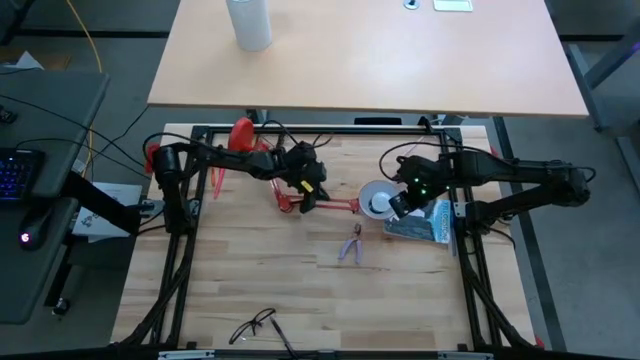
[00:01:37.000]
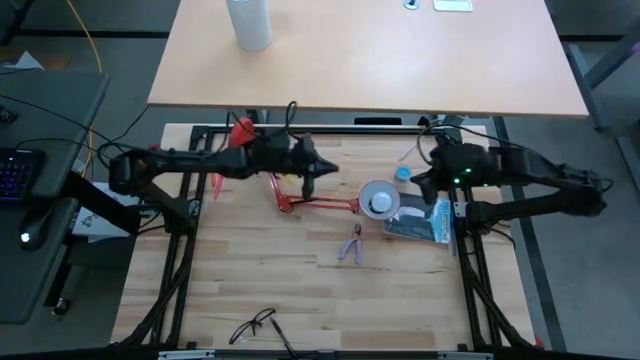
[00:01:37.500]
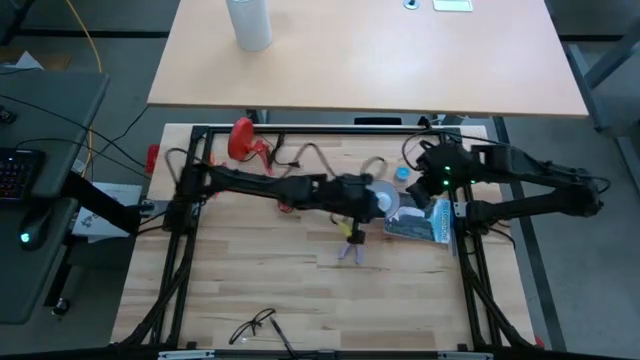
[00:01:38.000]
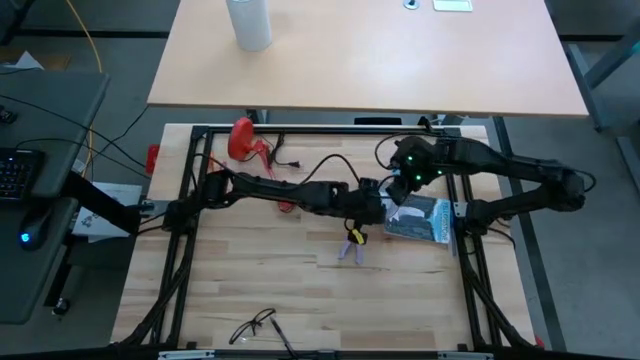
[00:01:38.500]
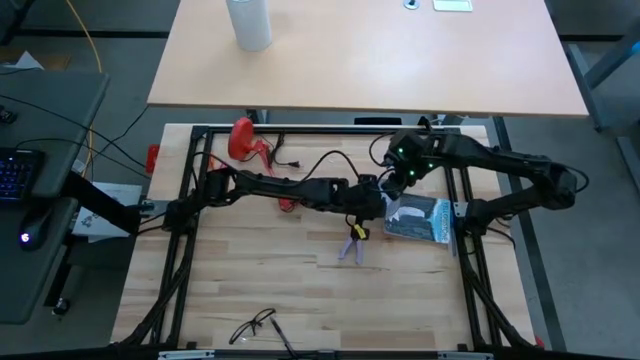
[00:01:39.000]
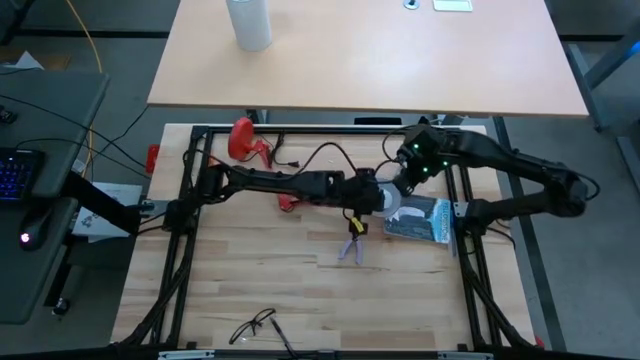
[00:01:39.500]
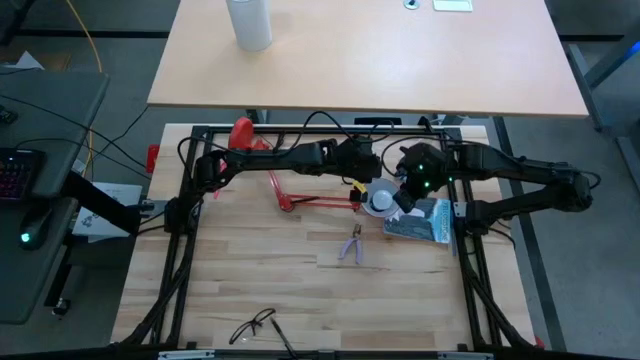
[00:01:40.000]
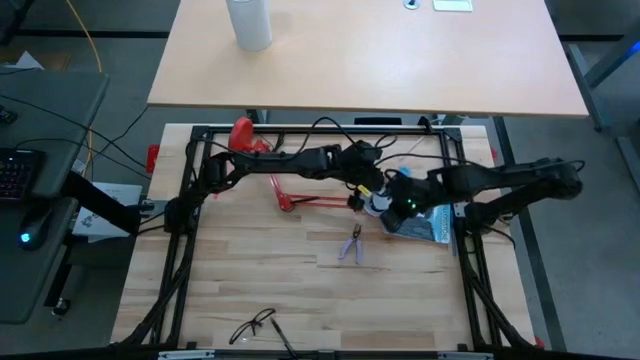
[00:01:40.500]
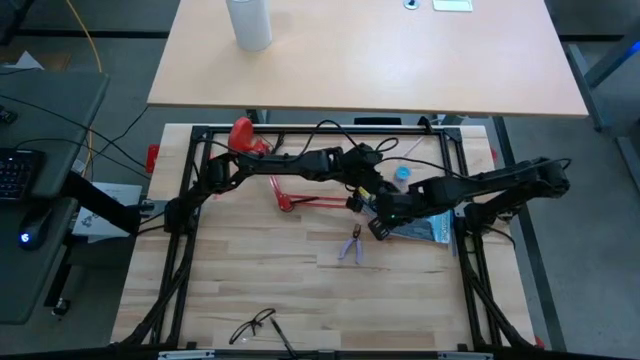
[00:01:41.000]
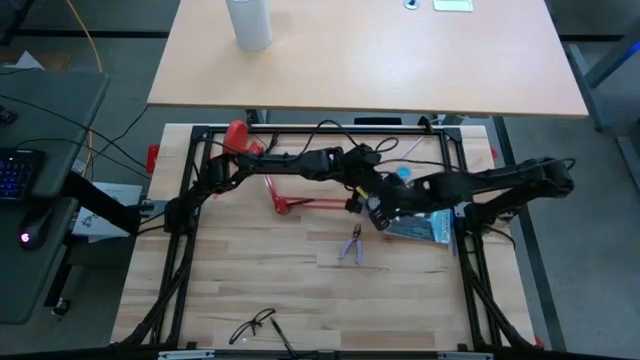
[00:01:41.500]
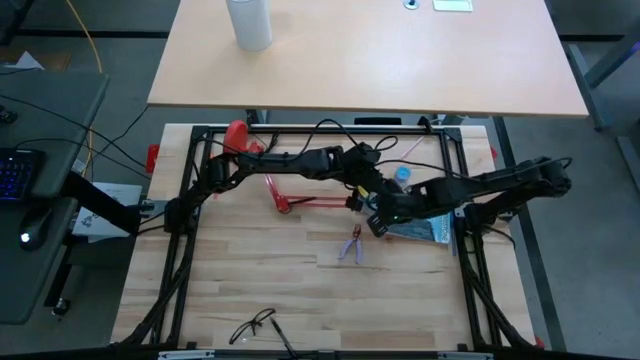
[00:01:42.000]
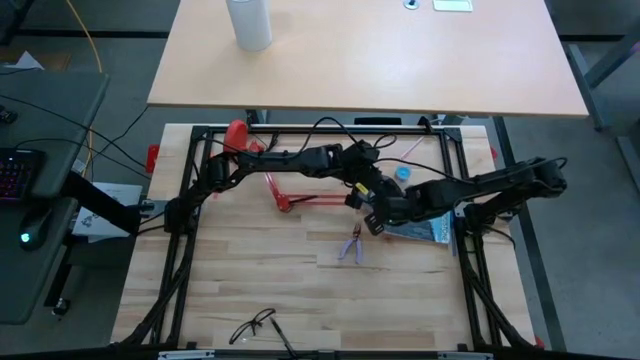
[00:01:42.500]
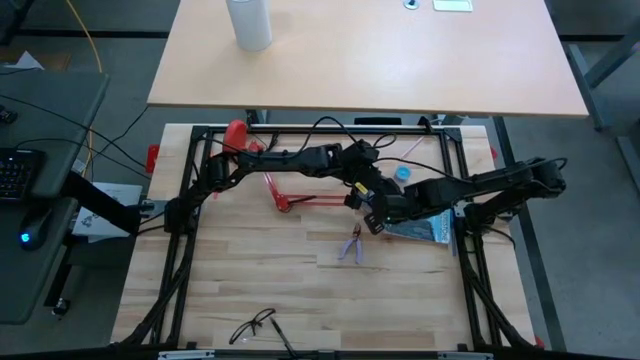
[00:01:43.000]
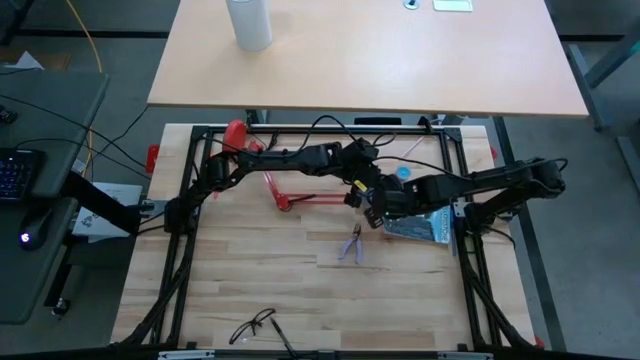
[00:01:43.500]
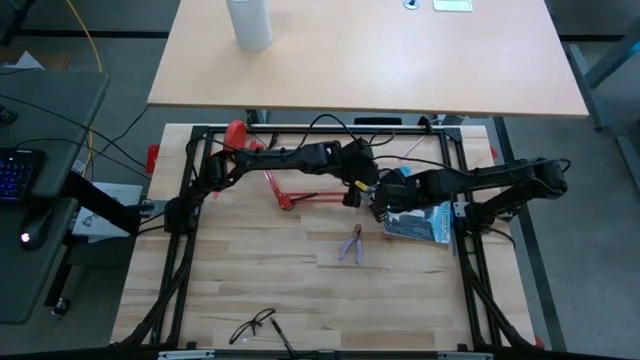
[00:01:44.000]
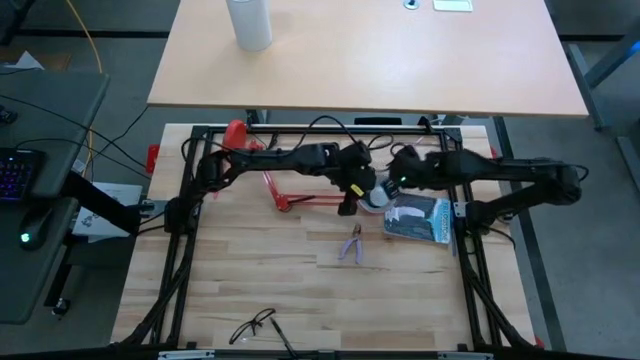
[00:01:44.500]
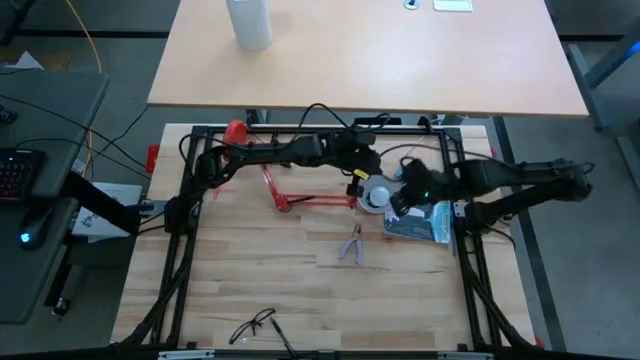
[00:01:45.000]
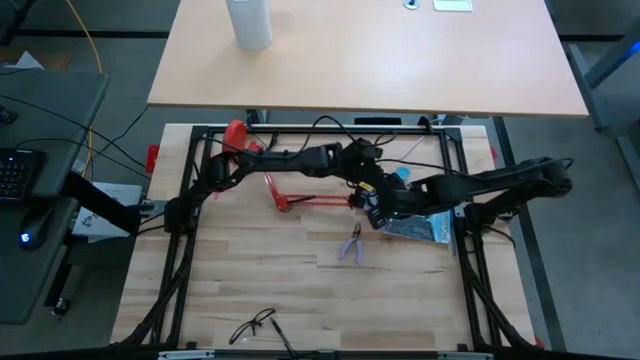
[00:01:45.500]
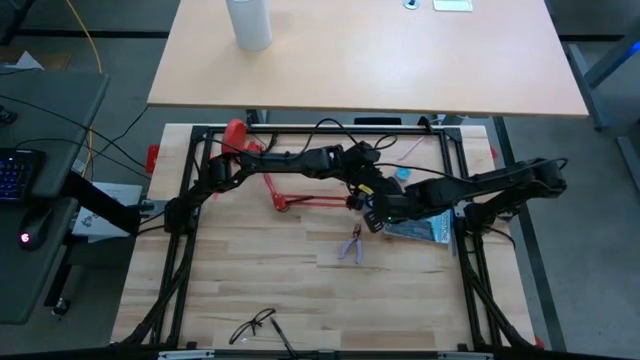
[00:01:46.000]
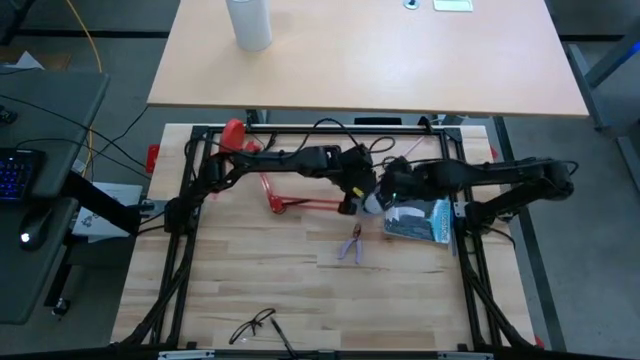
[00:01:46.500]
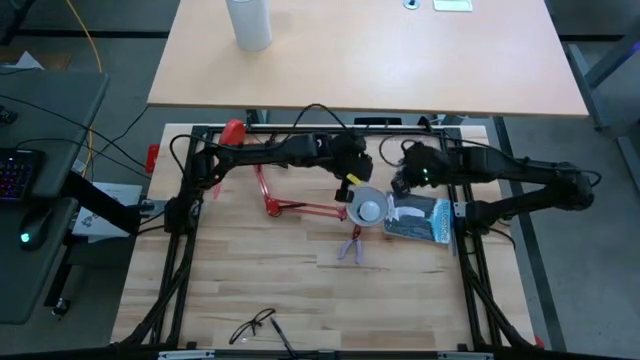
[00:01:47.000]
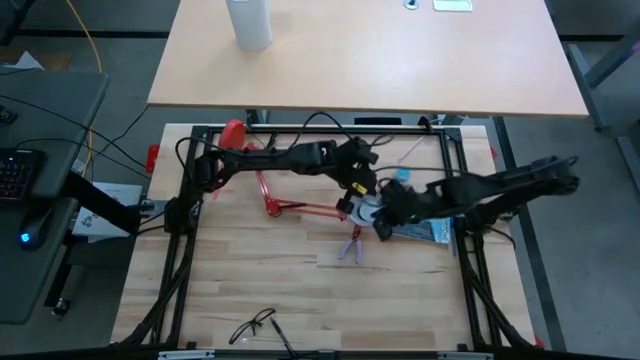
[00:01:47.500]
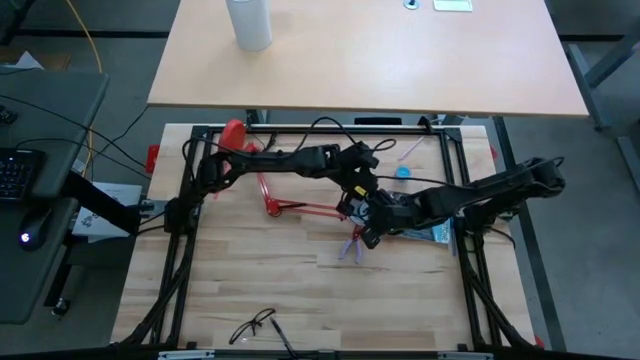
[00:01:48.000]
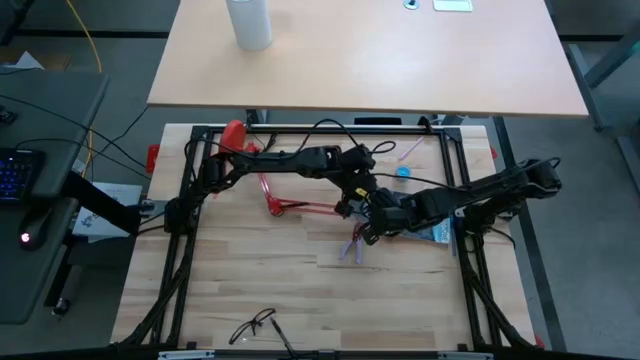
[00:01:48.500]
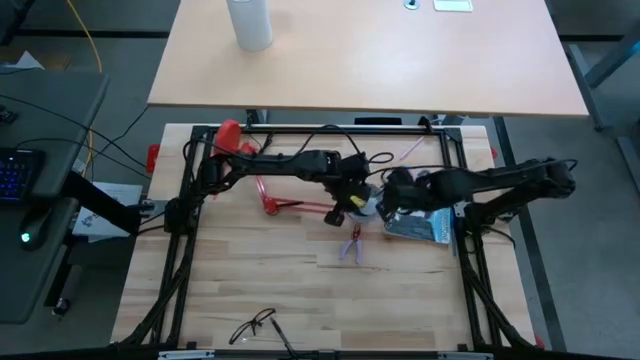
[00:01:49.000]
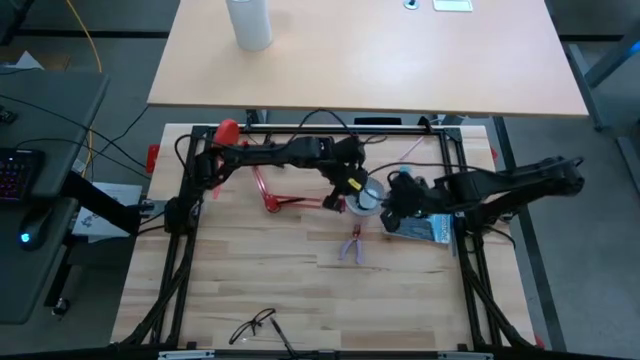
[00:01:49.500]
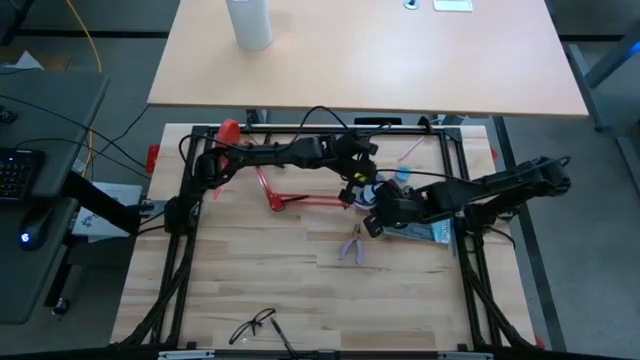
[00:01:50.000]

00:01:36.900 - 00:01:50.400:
Task: Screw lightbulb
Remove the lightbulb from the lamp socket

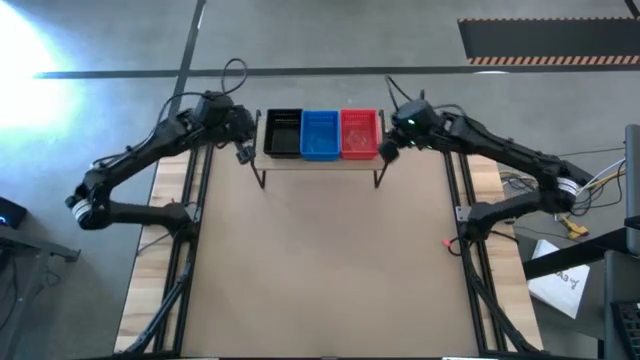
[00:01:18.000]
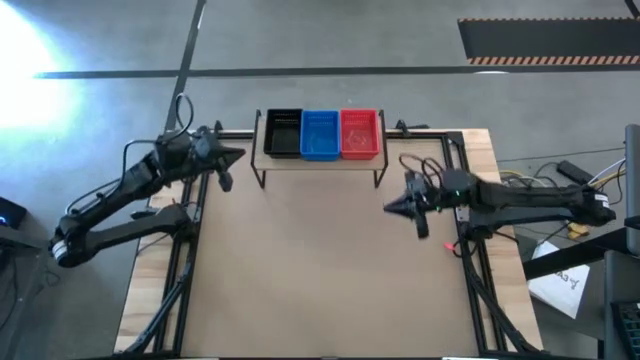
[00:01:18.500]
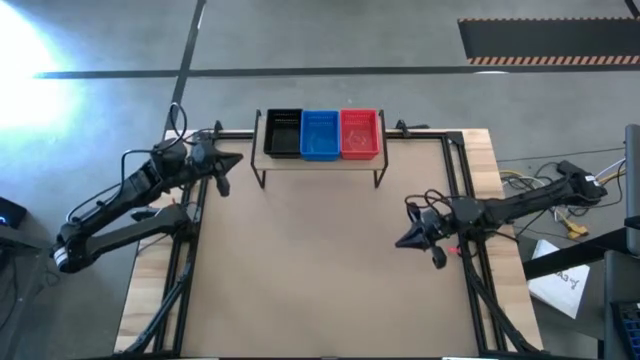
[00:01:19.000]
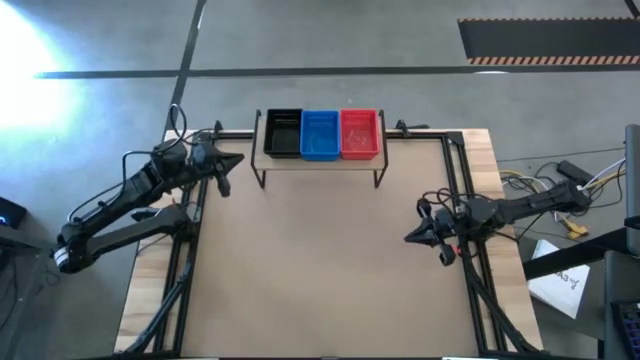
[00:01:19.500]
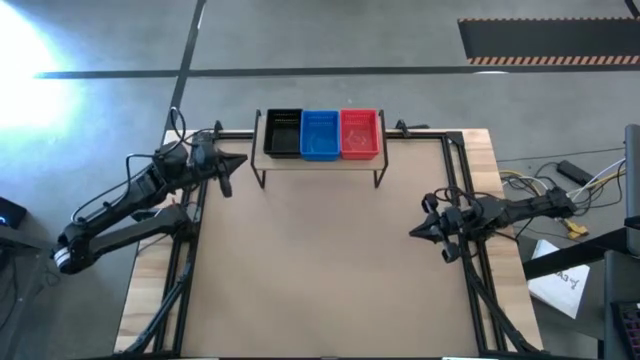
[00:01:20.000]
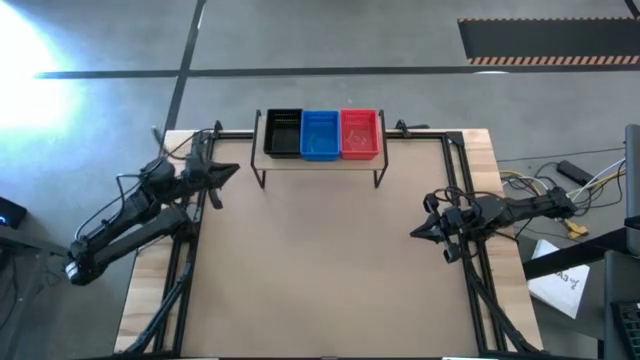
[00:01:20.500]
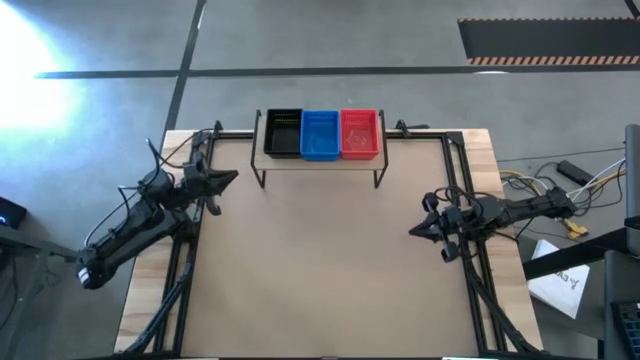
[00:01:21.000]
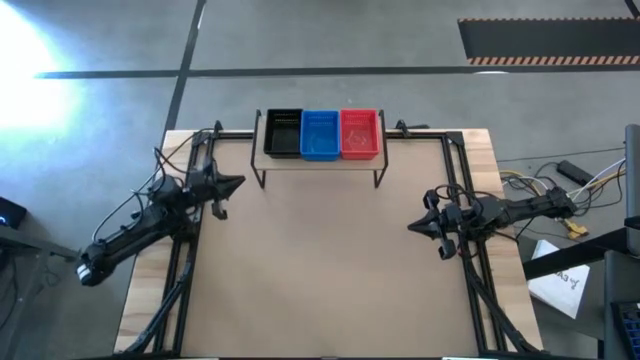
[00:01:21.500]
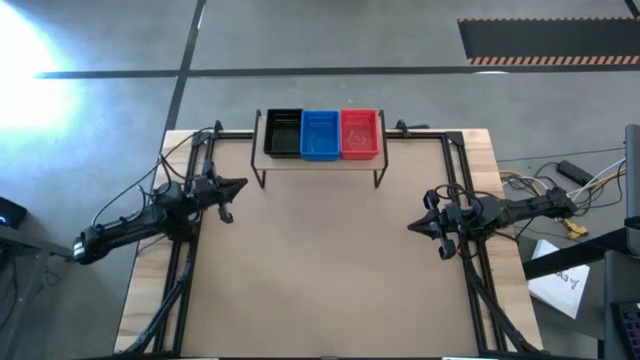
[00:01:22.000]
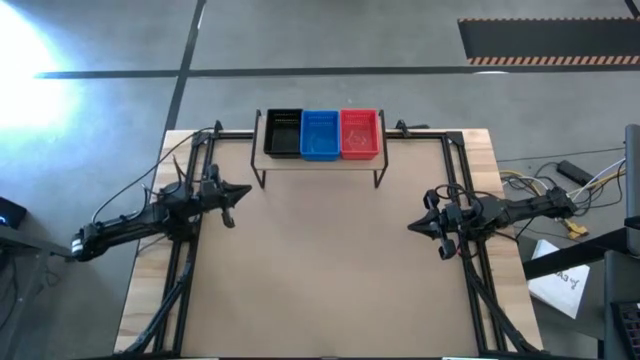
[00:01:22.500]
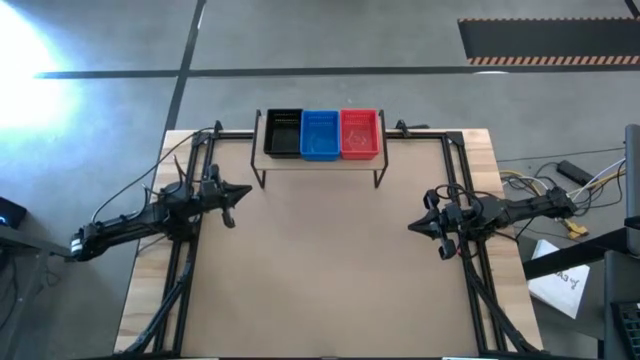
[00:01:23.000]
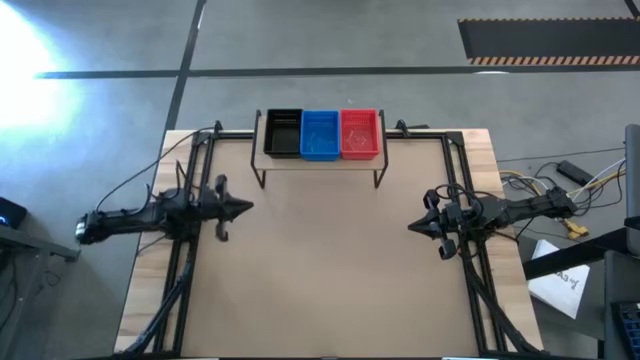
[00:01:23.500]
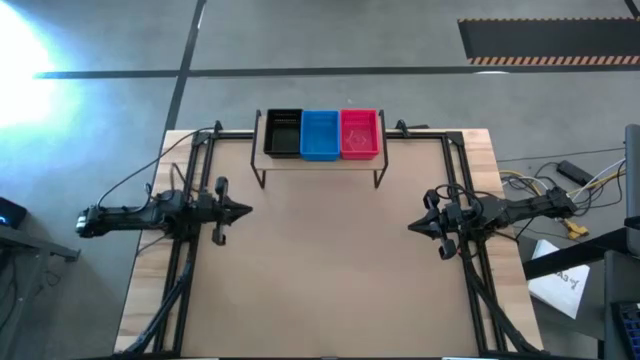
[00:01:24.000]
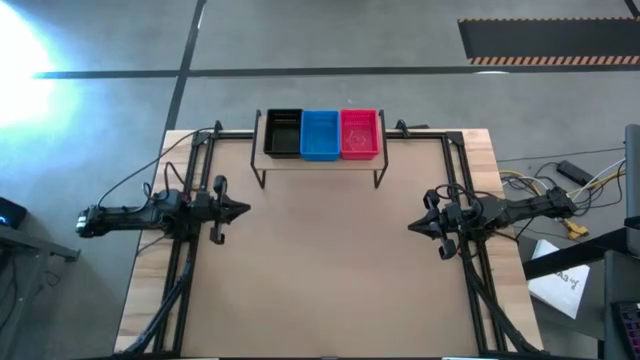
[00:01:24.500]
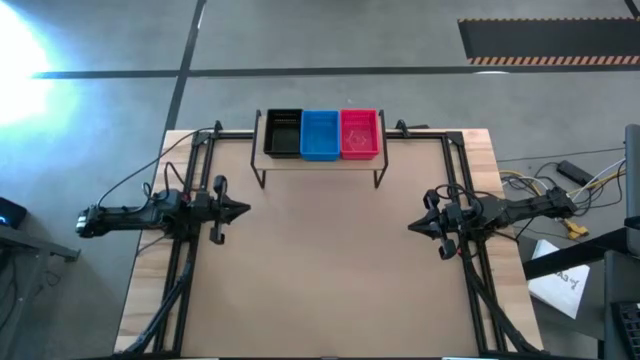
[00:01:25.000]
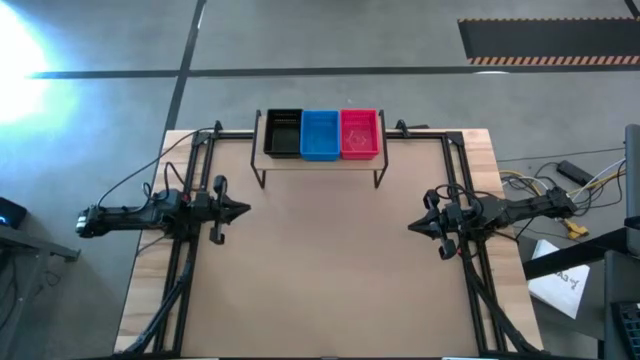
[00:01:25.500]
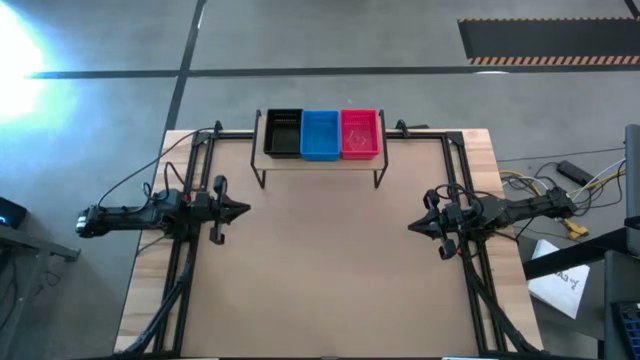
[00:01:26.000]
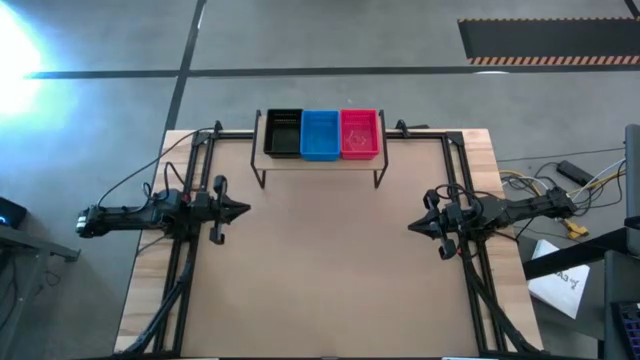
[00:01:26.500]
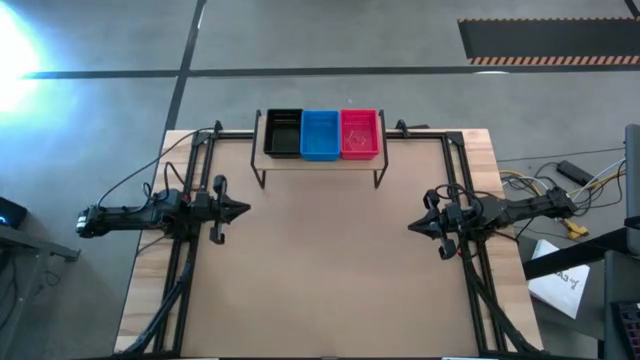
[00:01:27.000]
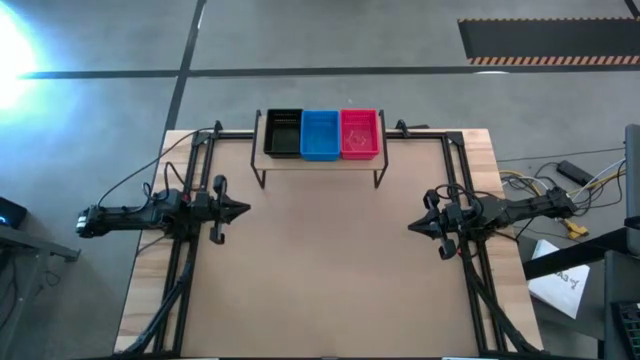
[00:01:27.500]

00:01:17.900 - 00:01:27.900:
Task: Stack baskets on shelf by color
Return to Home Position
